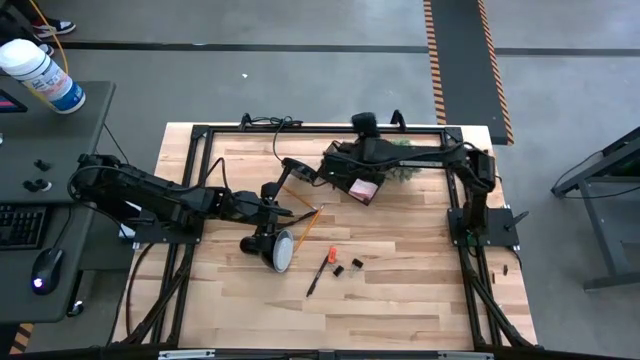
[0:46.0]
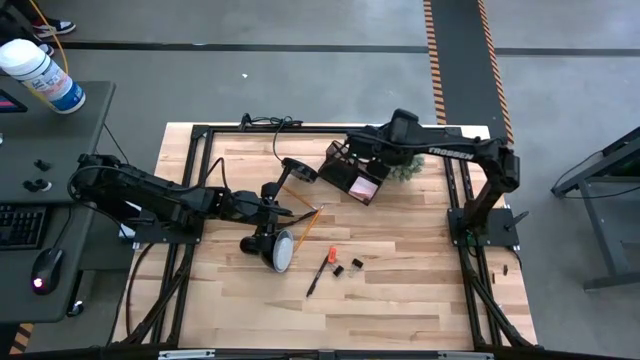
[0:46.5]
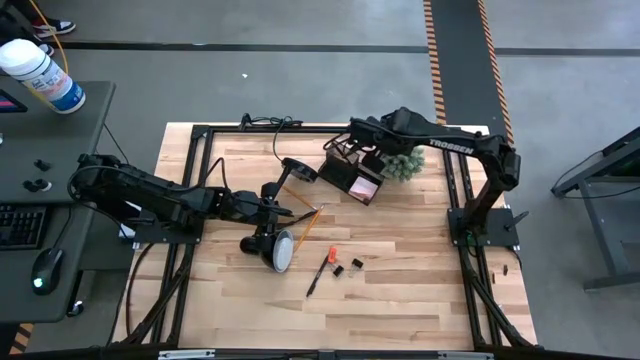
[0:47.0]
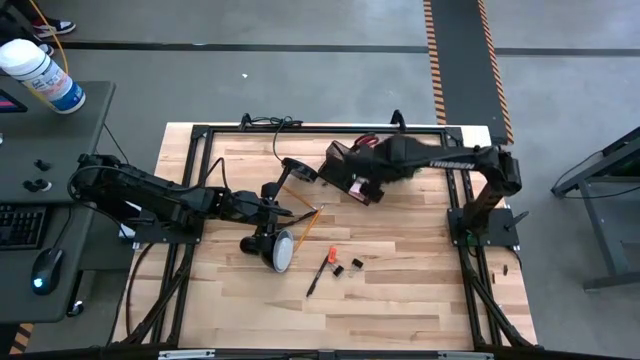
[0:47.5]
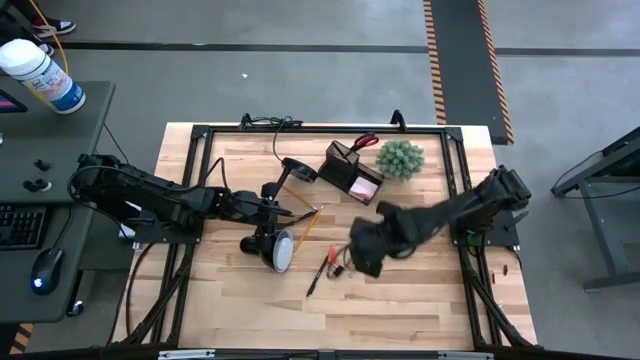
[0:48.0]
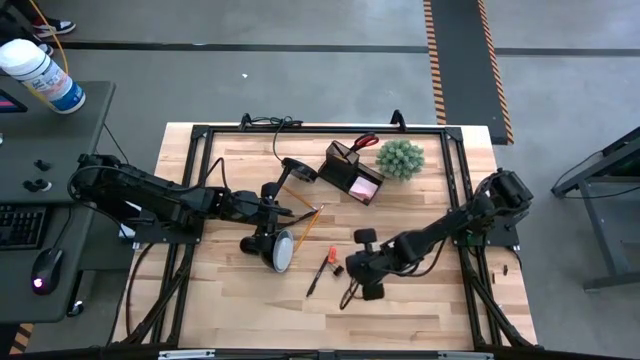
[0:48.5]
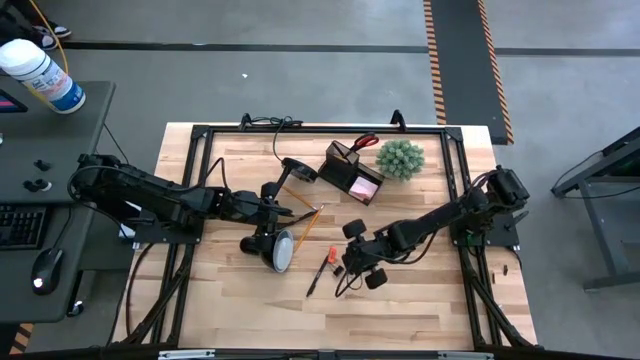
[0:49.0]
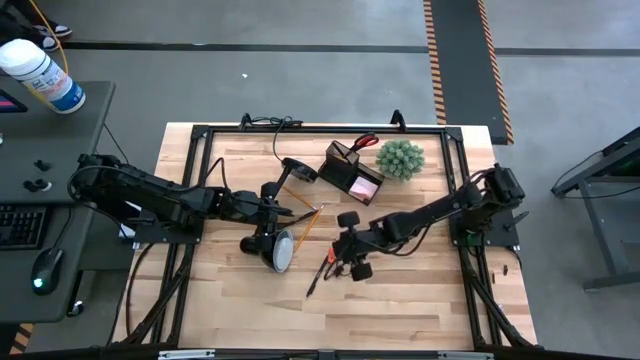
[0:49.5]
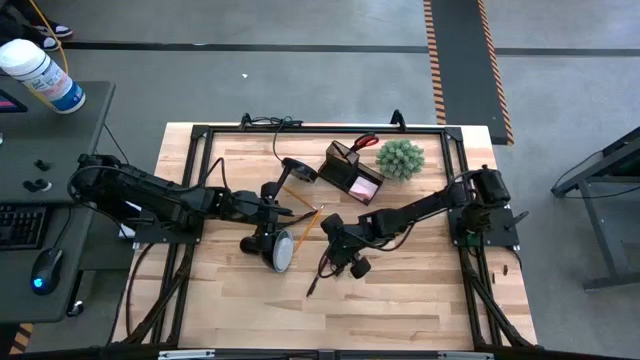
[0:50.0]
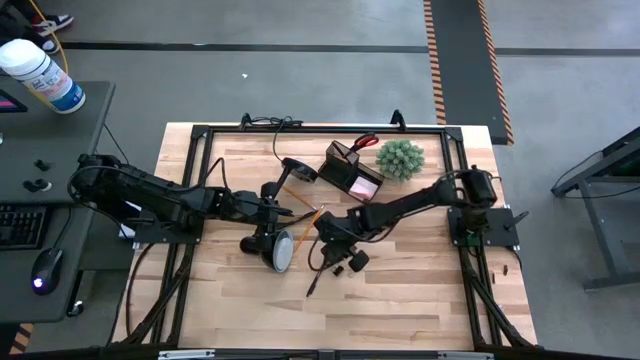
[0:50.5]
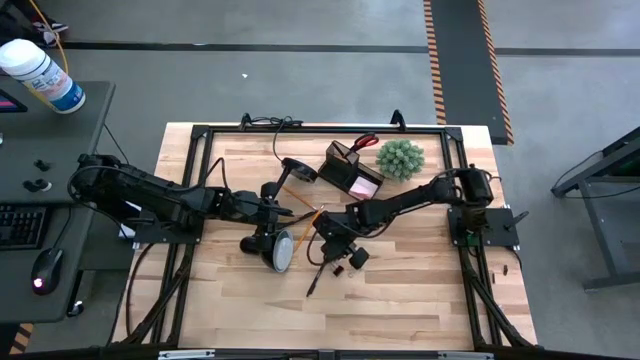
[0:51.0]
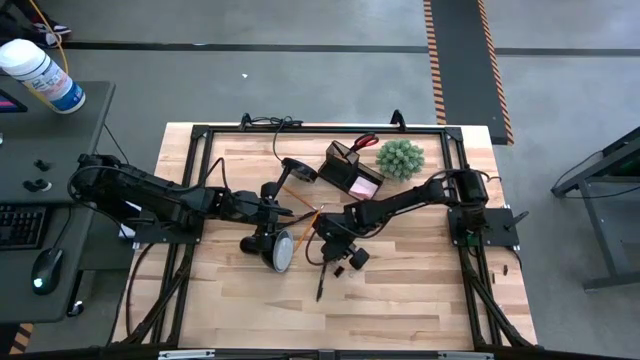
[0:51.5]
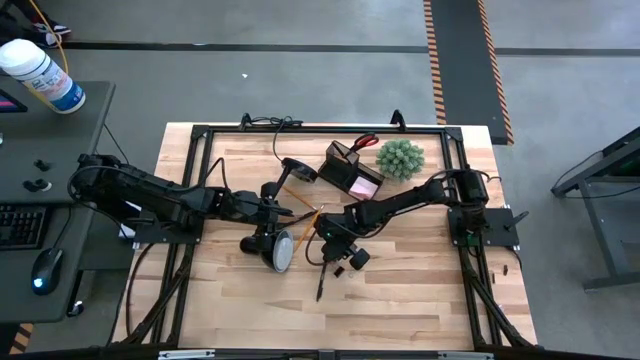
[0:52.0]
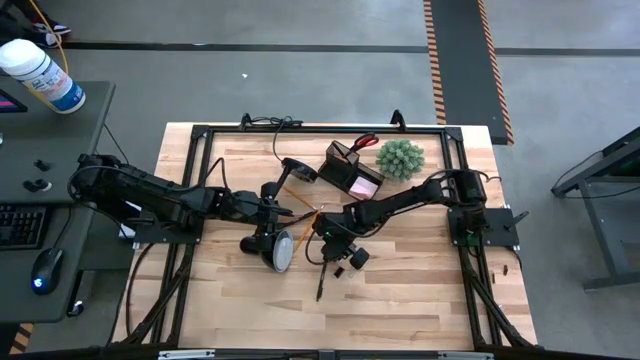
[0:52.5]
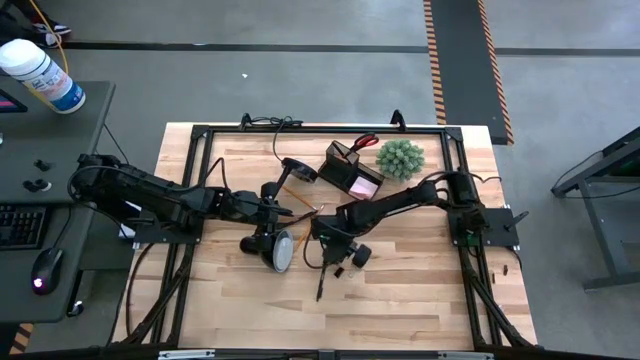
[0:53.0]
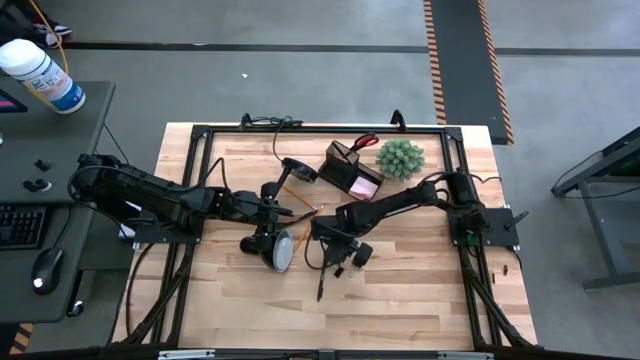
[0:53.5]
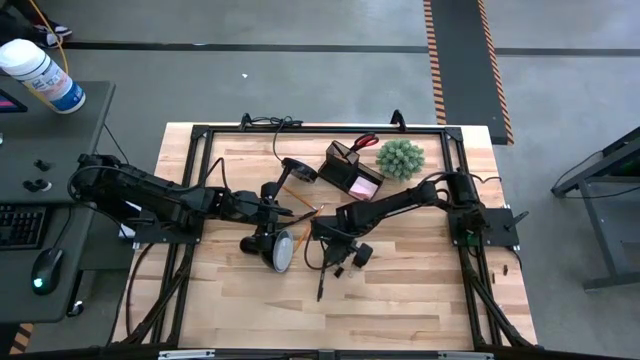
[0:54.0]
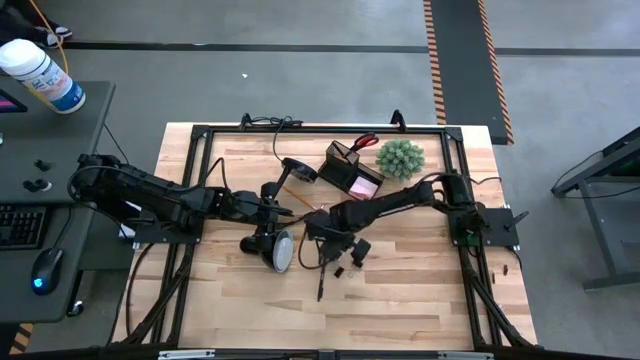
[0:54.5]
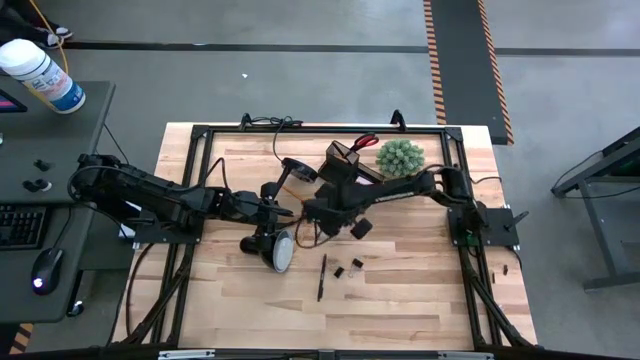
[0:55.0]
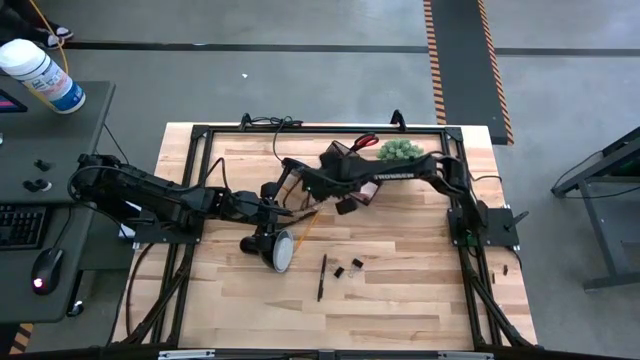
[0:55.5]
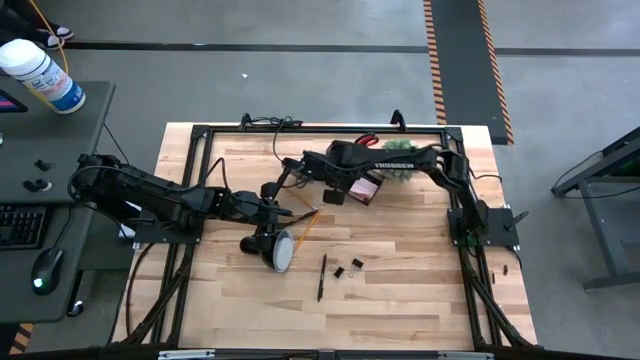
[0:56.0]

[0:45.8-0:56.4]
Task: Pick and place office supplies into organizer
Put the eraser into the desk organizer

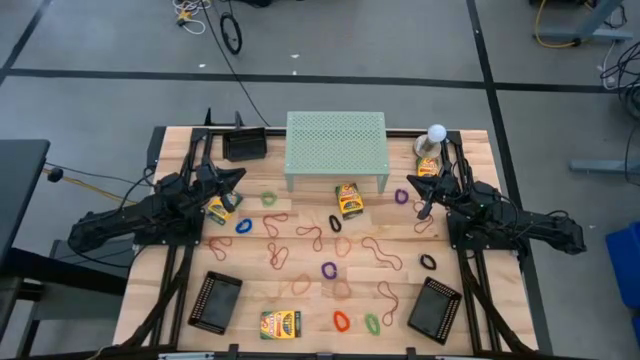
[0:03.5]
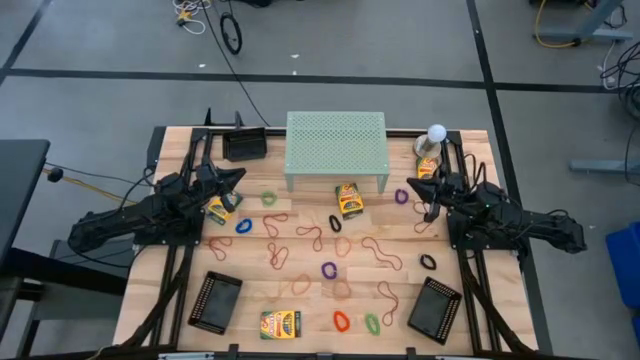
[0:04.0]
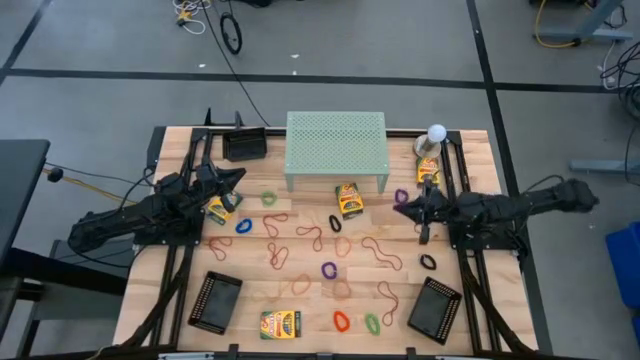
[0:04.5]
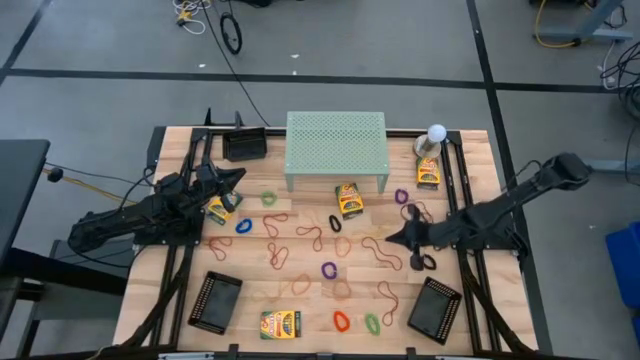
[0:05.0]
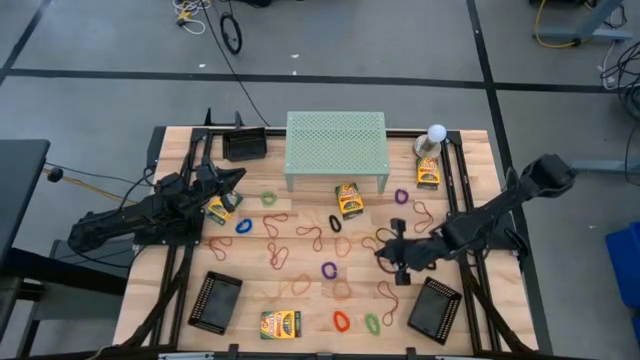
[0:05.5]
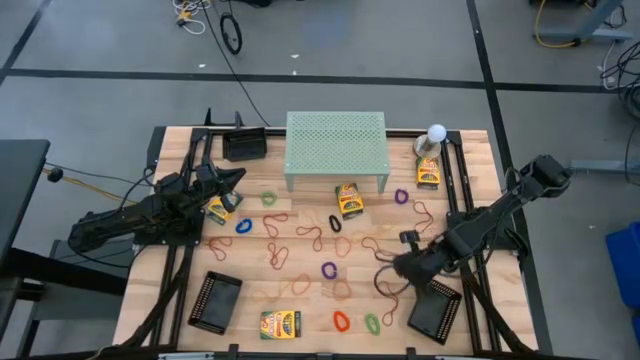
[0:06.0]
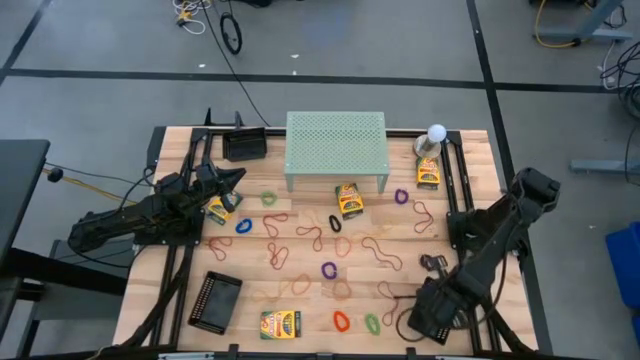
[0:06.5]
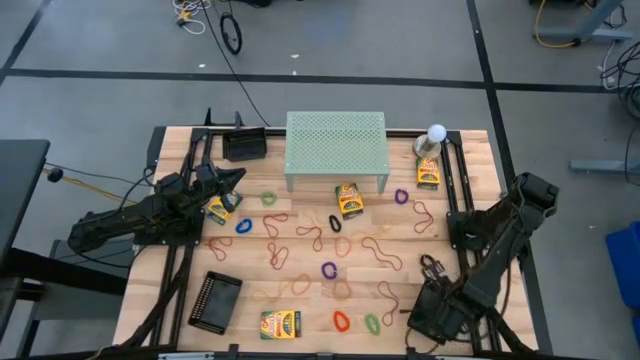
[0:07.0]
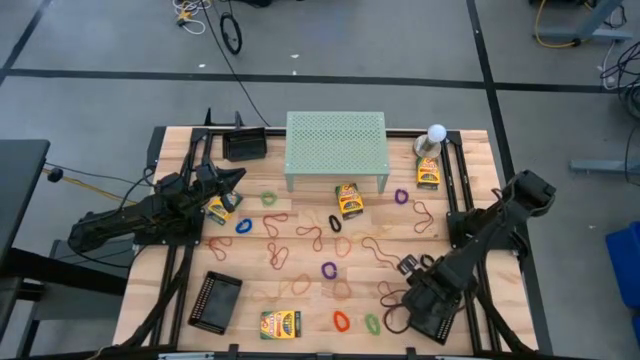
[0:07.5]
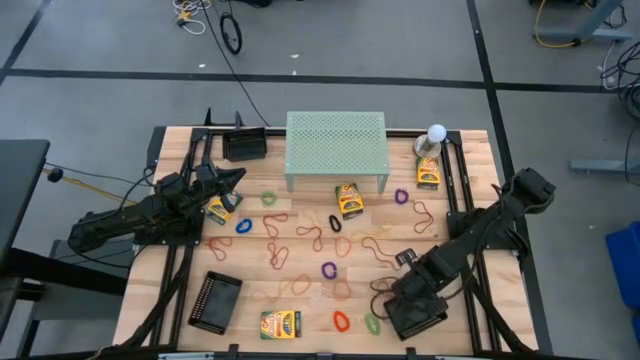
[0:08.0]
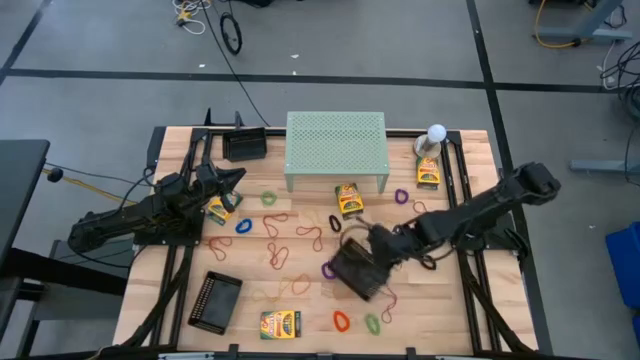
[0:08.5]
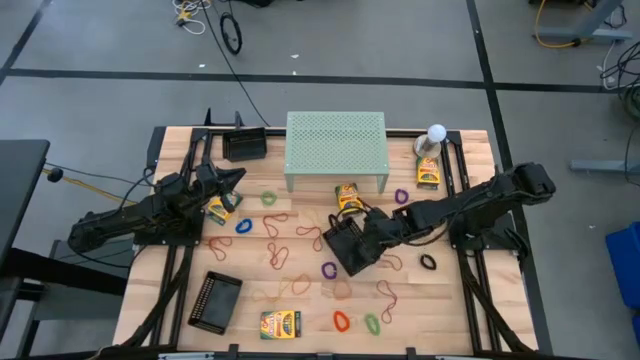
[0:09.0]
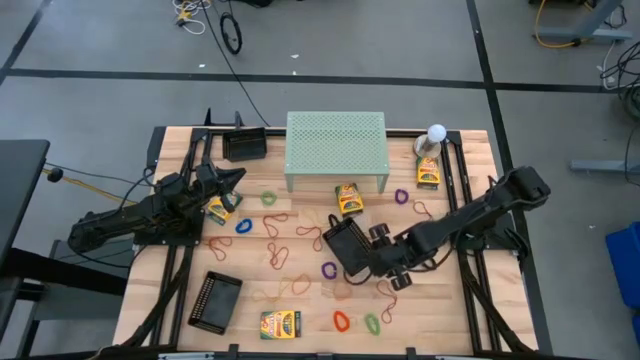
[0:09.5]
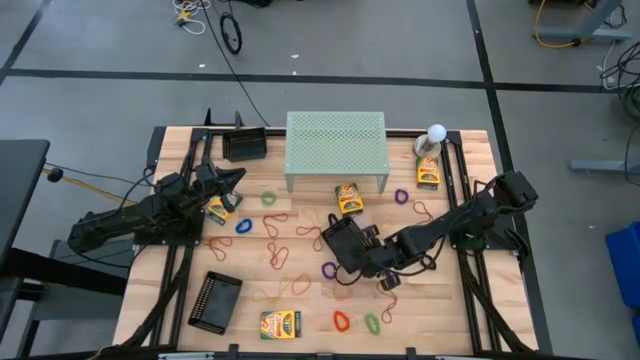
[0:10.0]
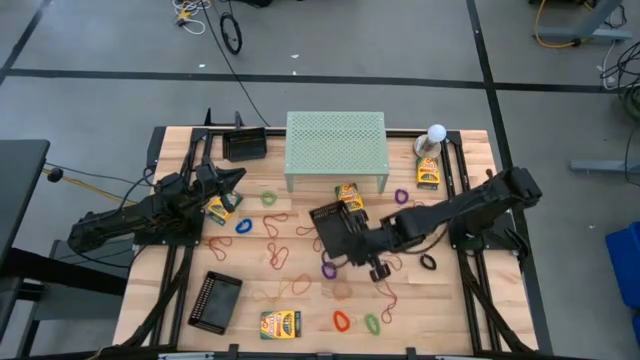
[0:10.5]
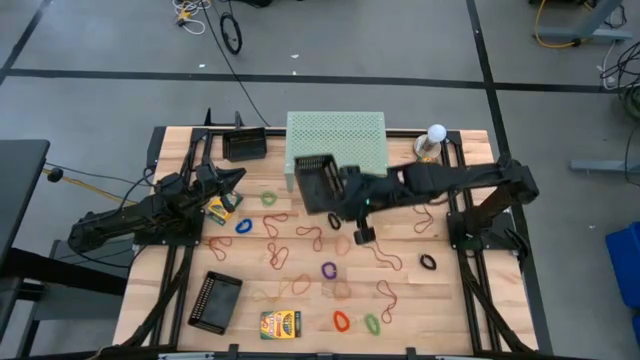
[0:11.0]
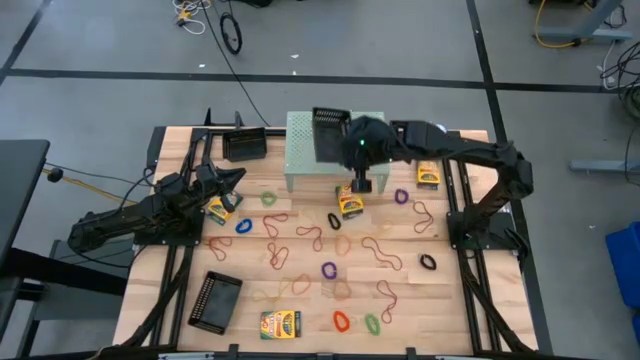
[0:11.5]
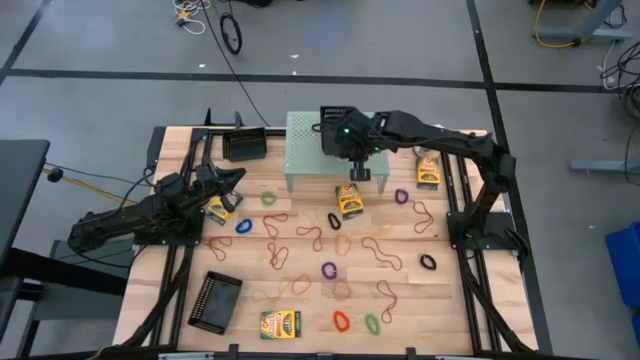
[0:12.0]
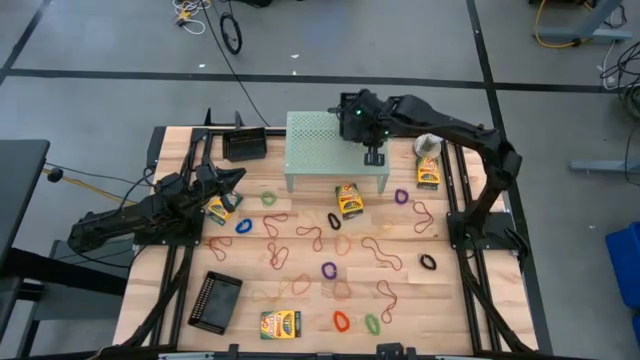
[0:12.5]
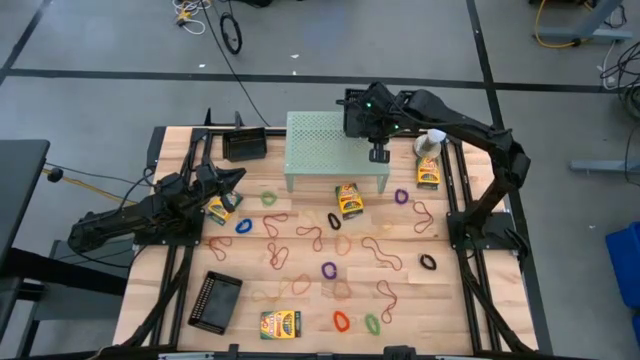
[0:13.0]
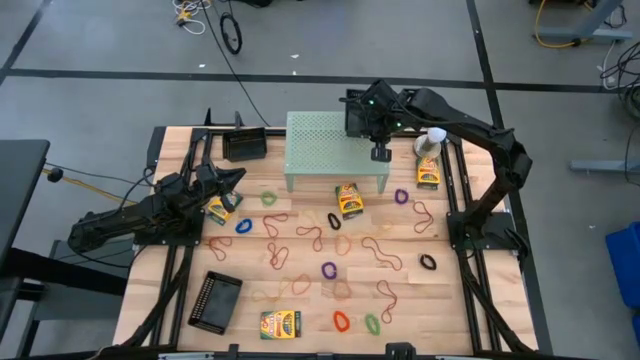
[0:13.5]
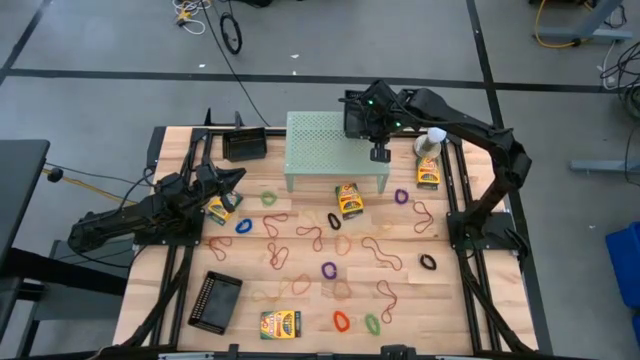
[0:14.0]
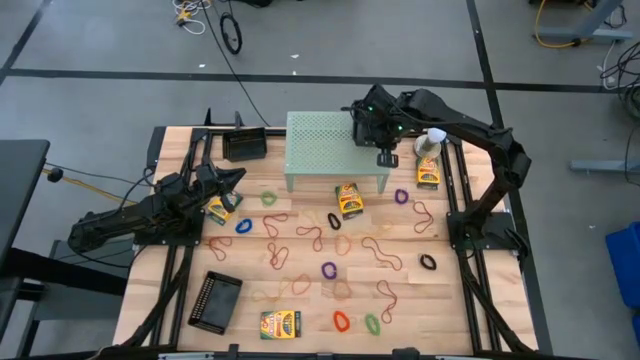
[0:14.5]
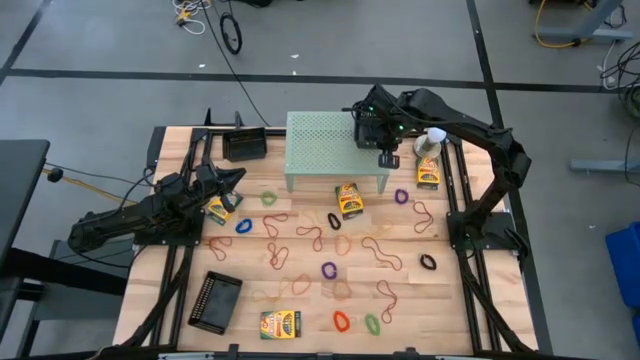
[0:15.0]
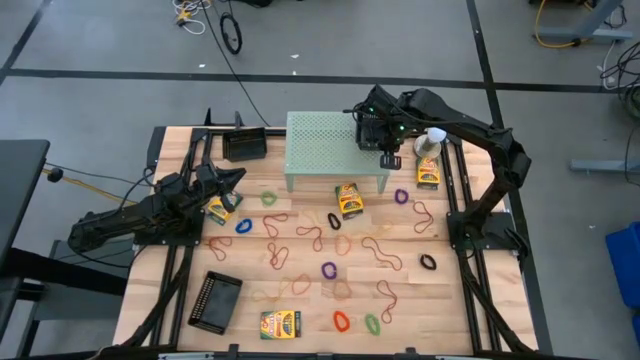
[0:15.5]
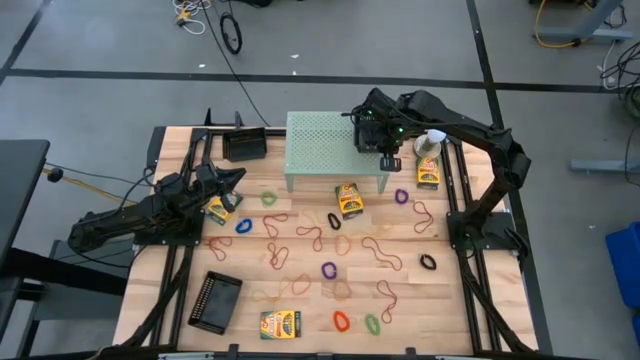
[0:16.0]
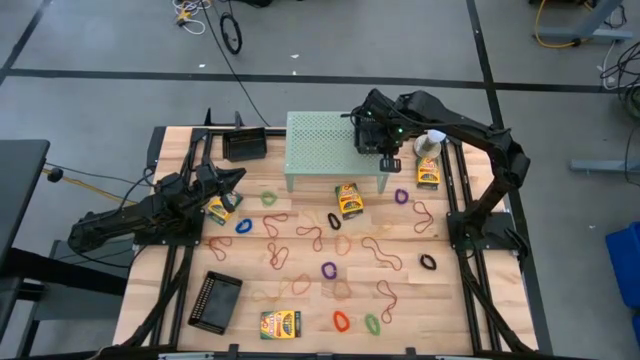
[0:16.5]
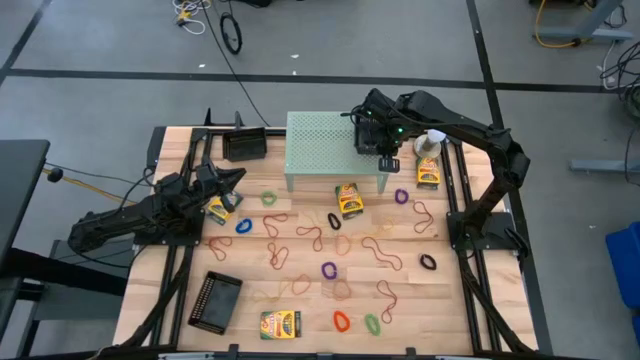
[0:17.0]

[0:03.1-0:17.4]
Task: Pick & Place Office Desk Supplies
Put the black bin on the shelf
